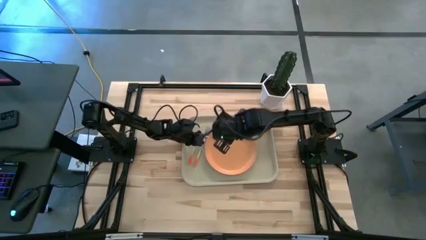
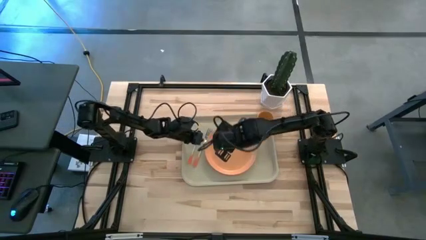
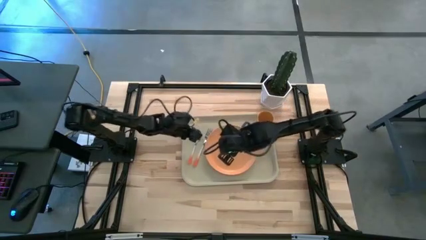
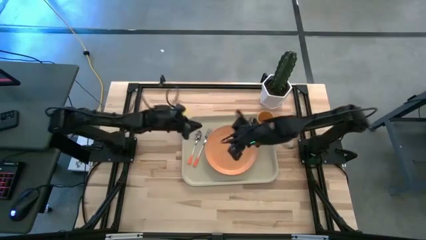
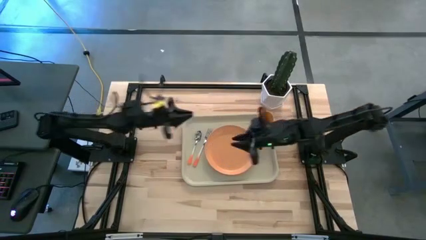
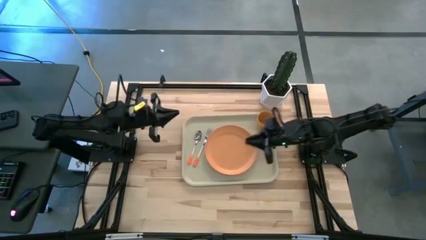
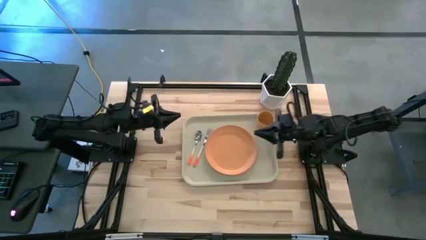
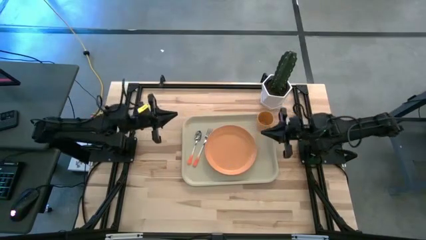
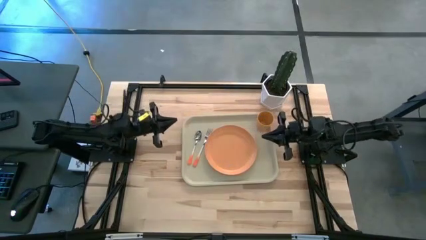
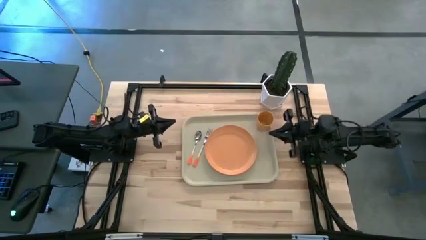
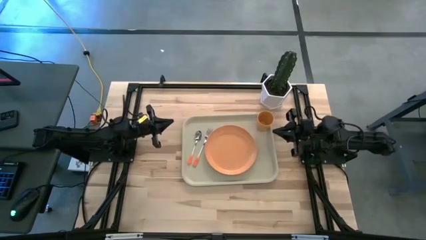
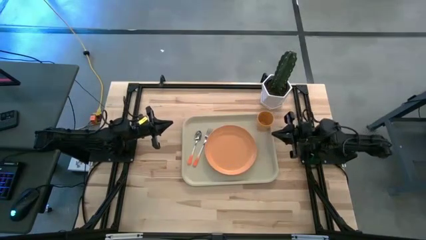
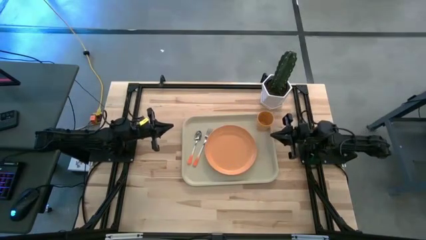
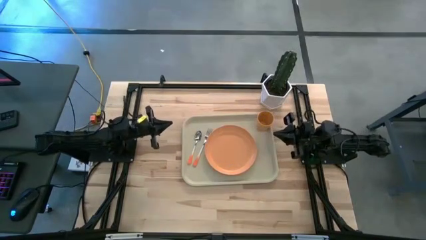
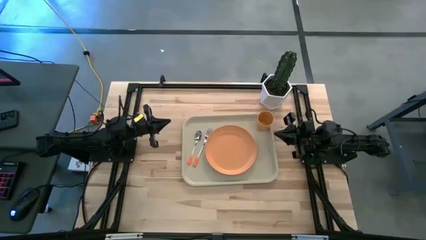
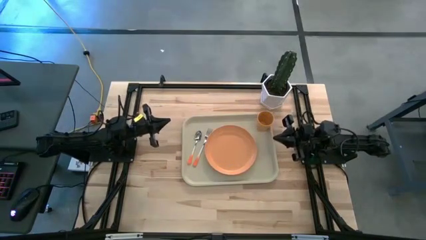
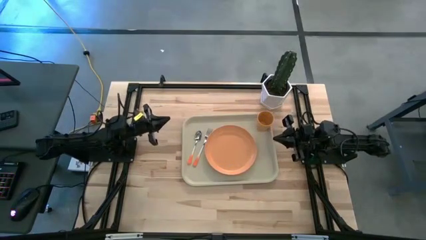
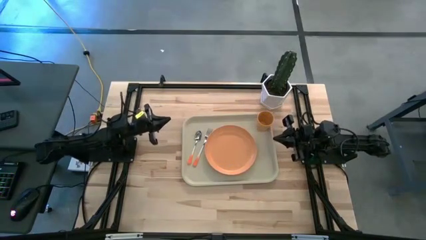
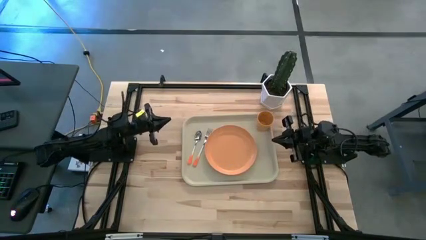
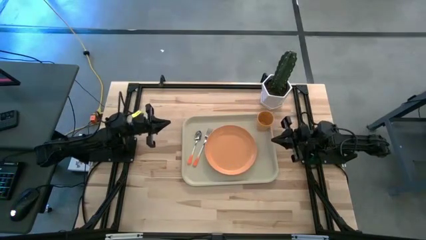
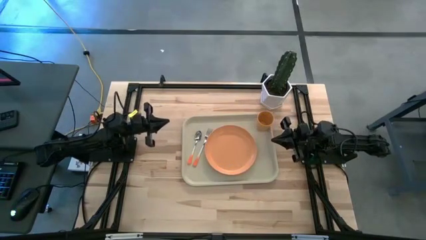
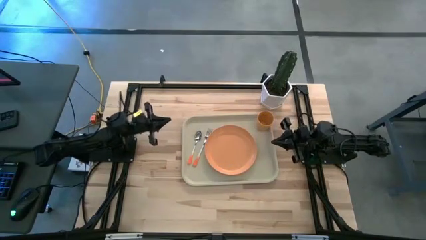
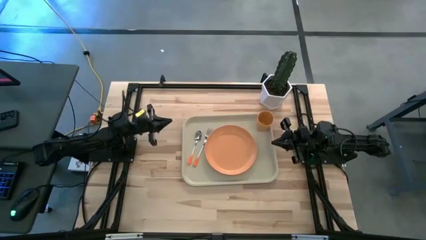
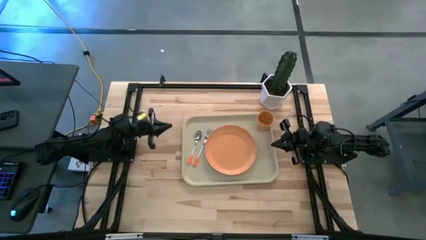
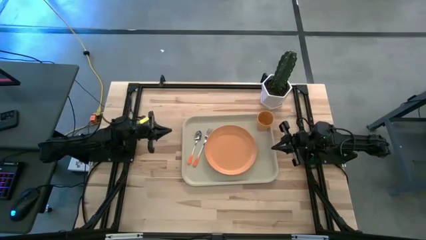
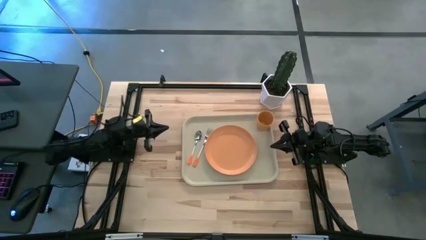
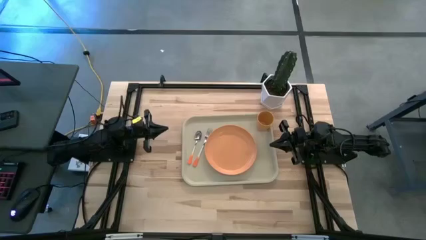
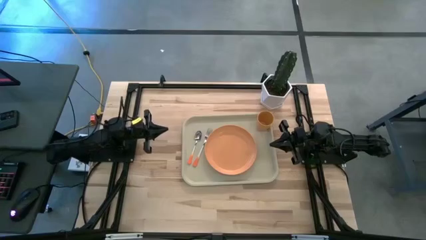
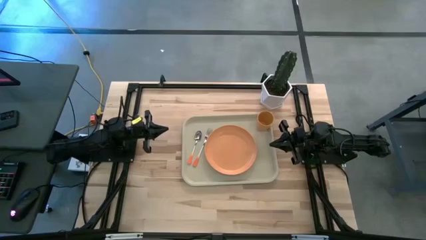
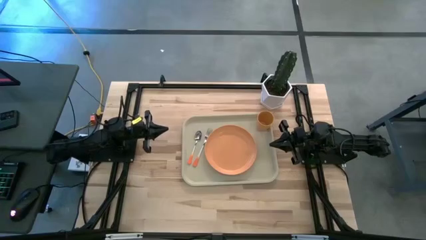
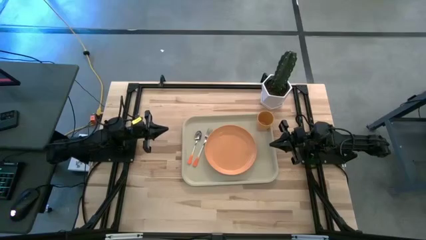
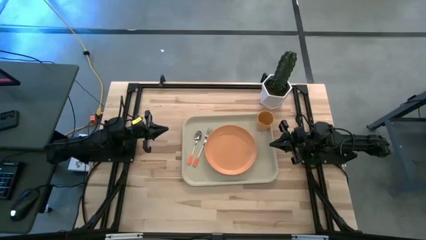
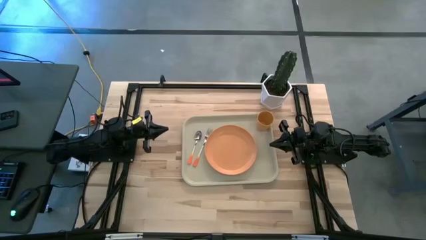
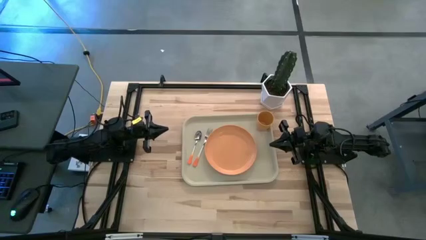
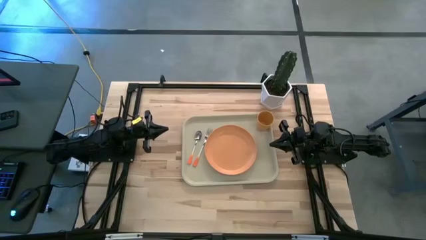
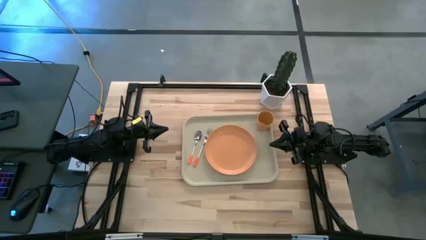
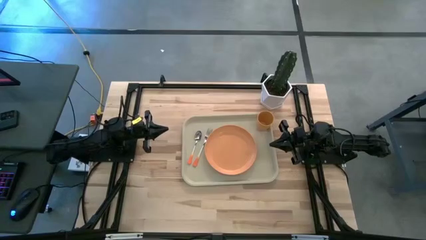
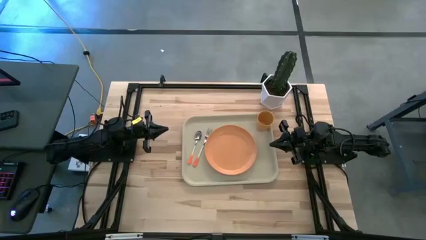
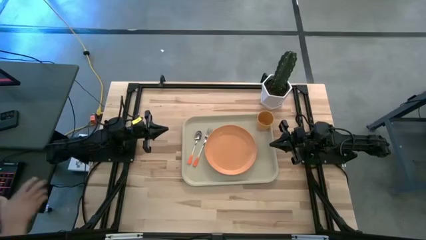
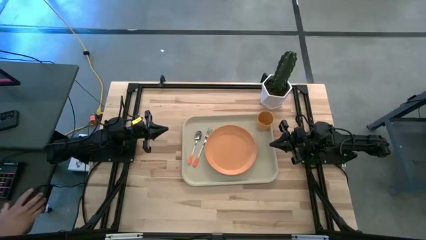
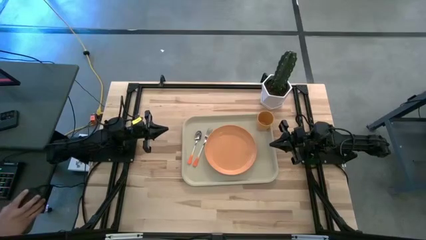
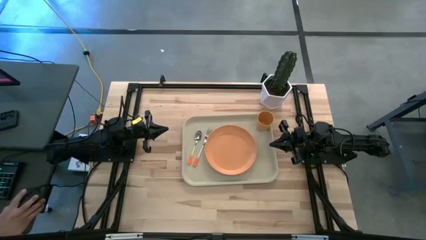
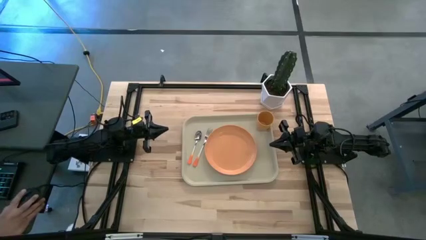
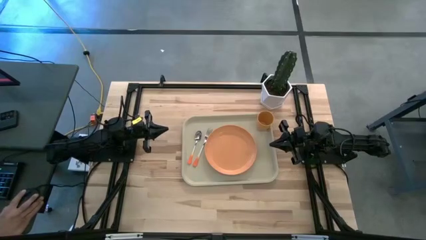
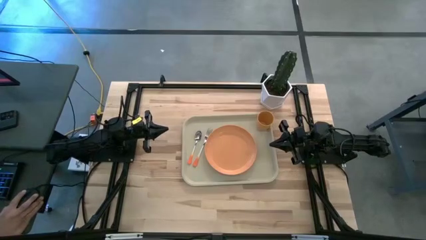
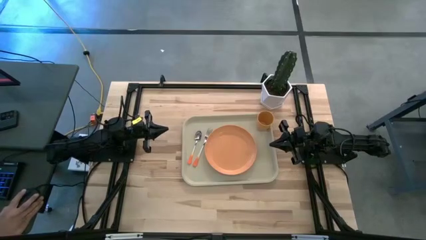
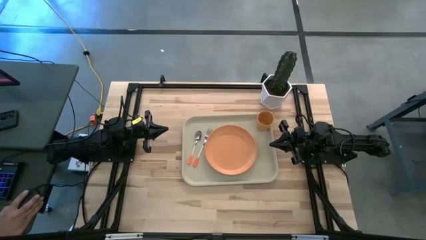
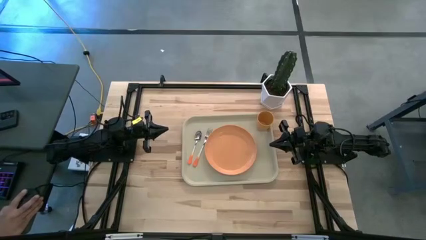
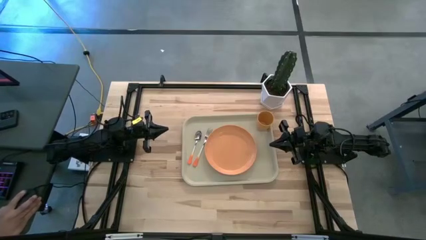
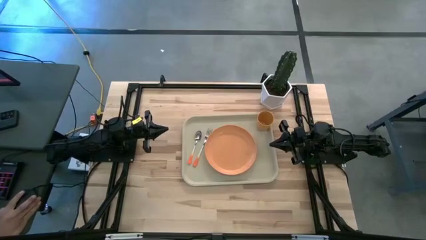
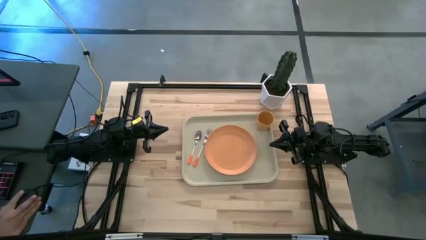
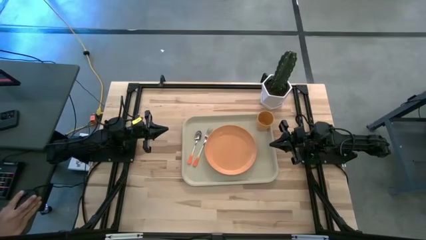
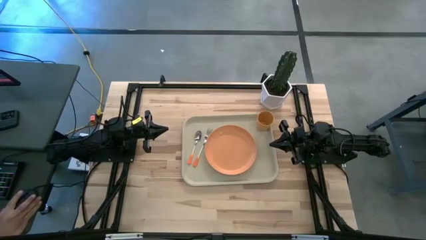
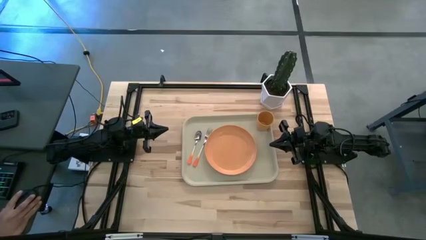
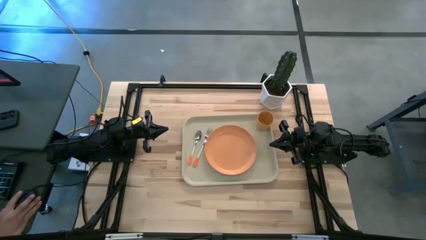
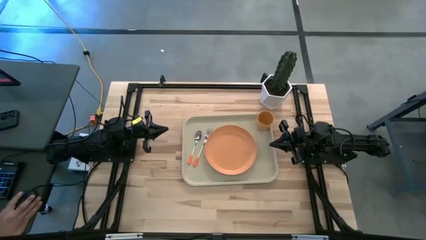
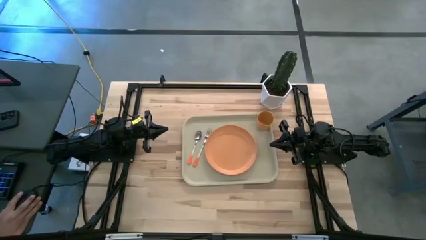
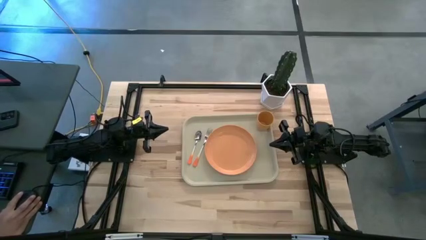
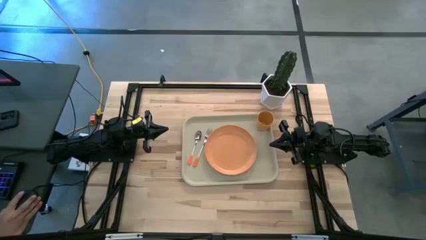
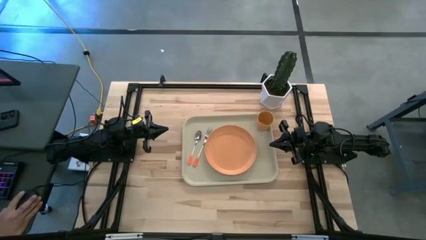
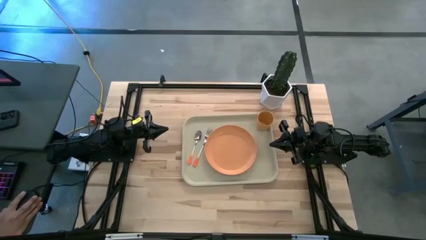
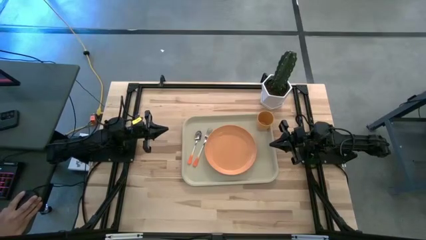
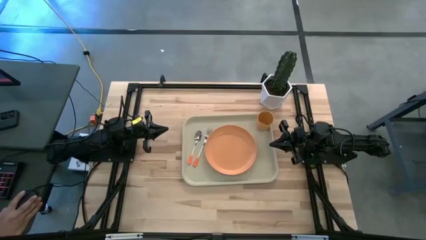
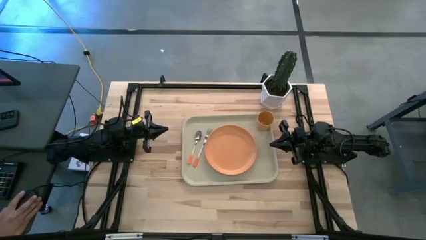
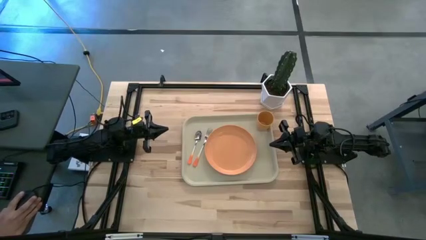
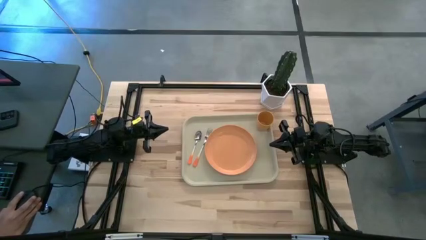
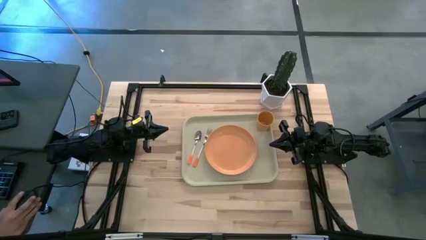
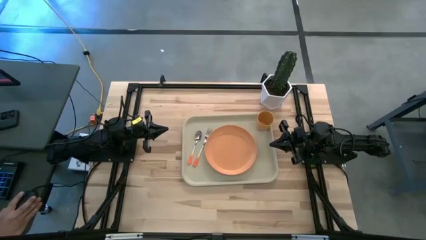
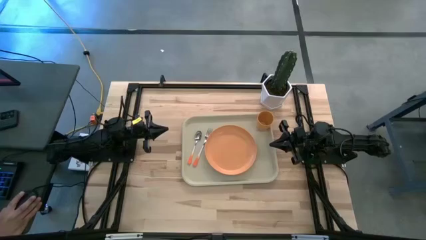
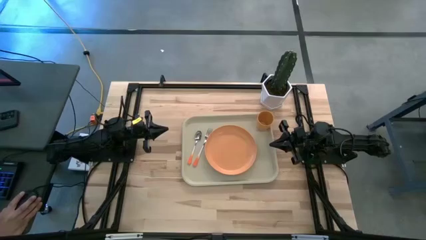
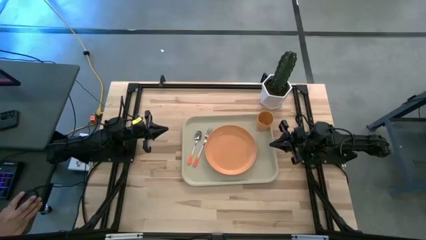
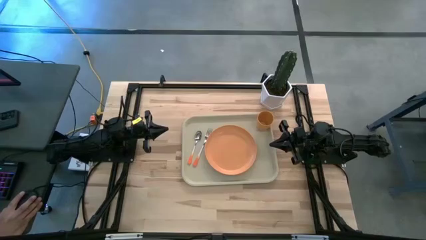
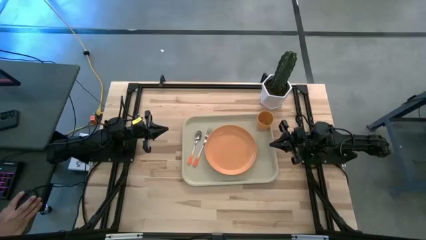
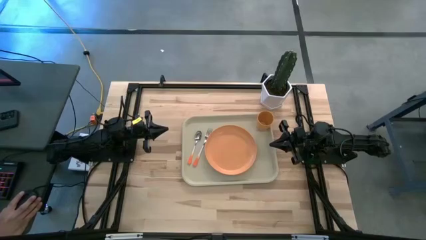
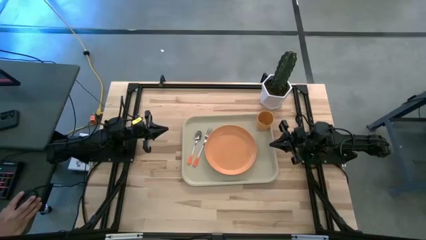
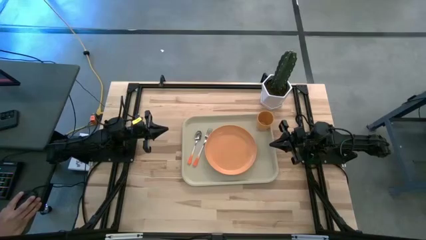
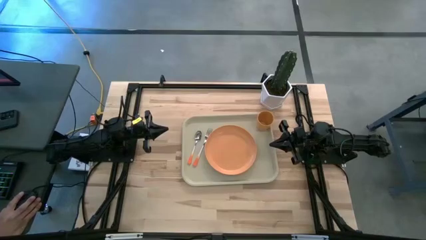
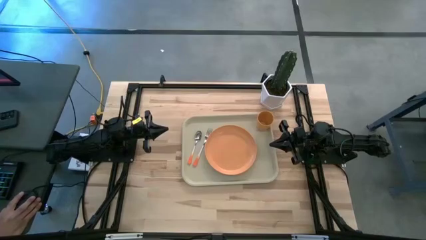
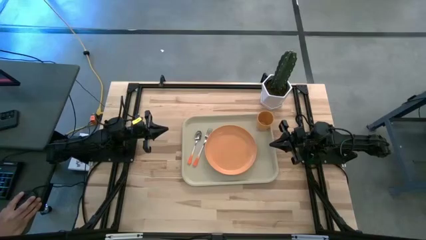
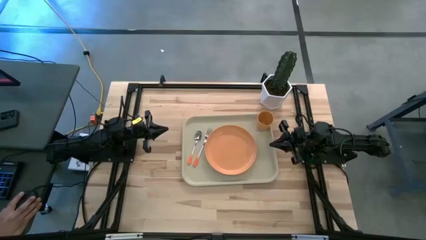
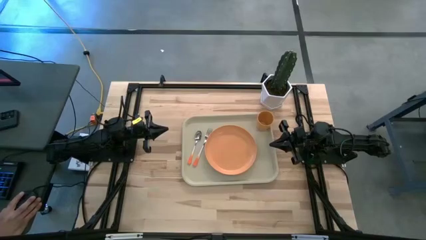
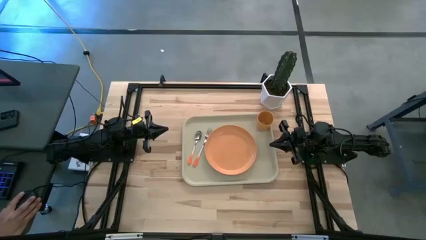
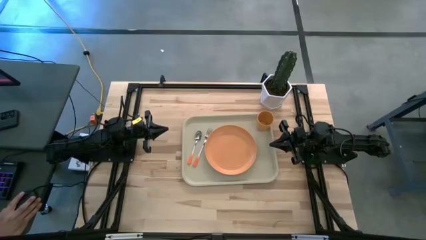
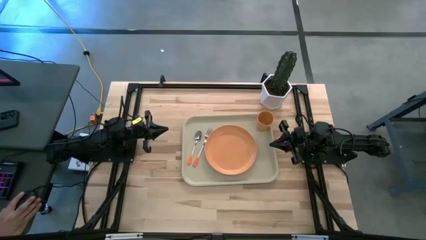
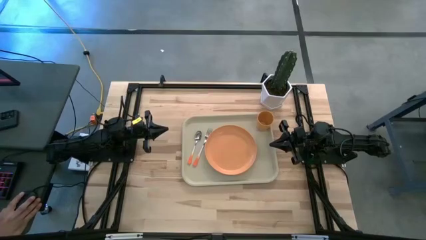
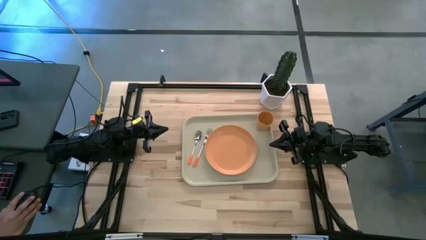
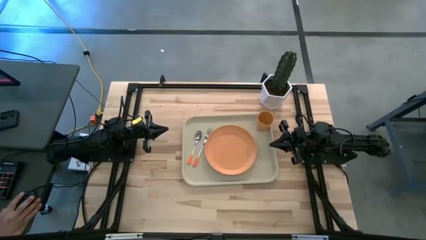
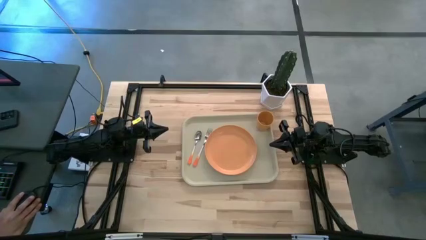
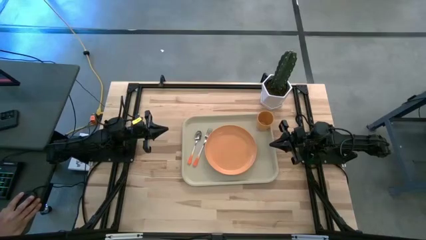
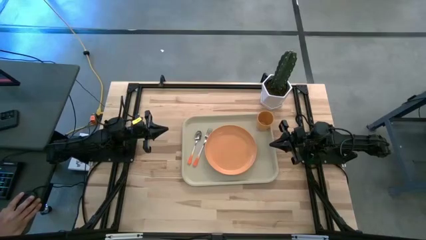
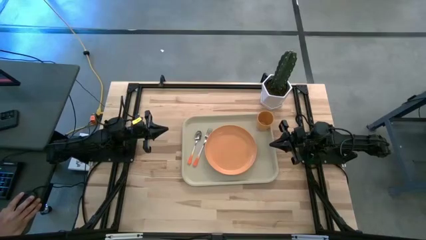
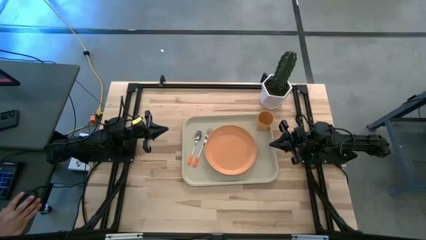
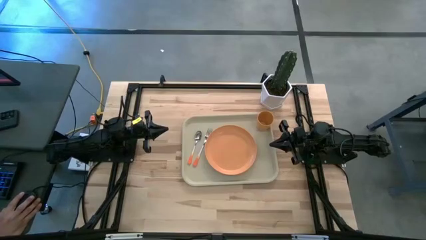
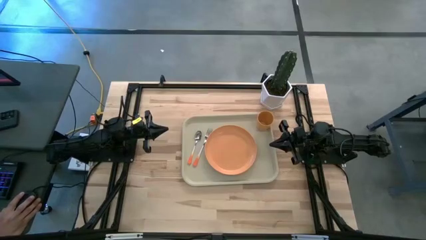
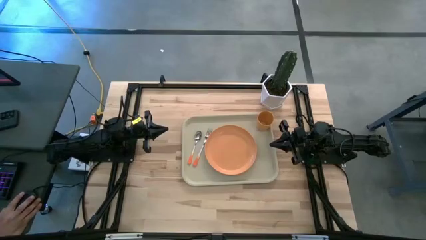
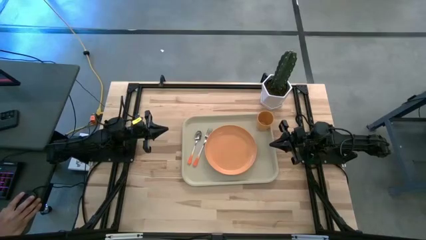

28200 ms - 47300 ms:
Task: Pick and place plate/cup/fork/spoon on tray
Return to Home Position
